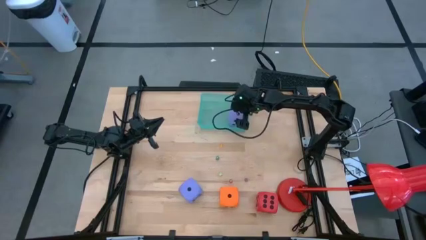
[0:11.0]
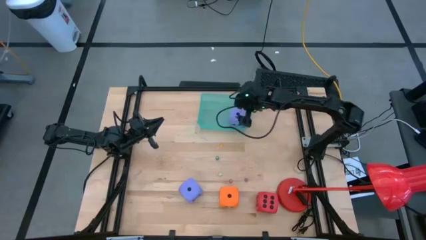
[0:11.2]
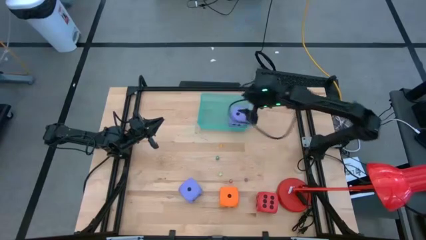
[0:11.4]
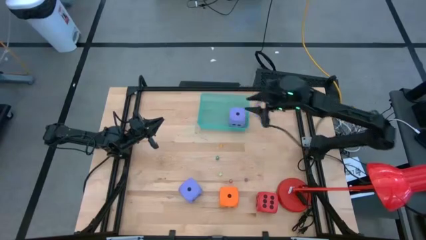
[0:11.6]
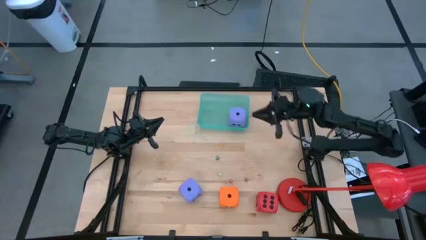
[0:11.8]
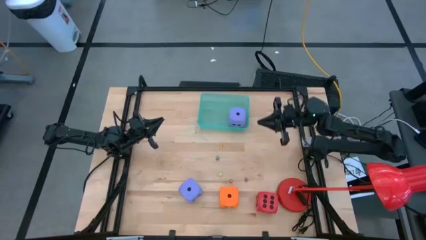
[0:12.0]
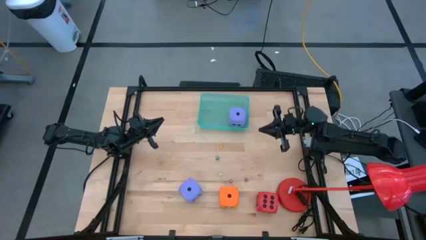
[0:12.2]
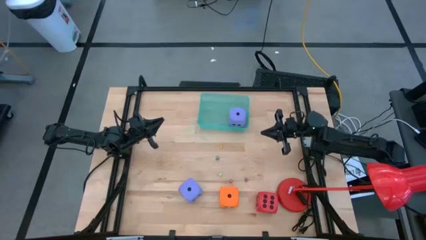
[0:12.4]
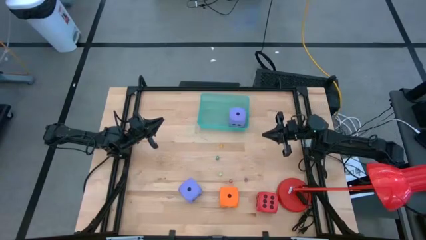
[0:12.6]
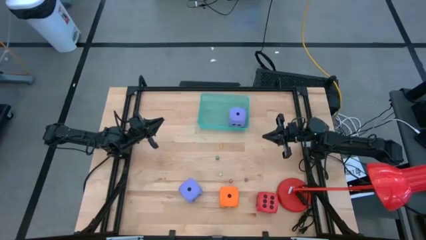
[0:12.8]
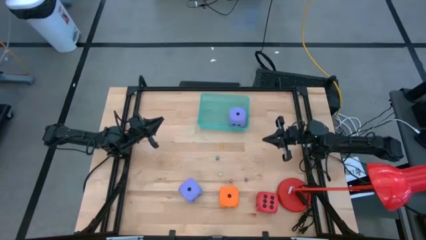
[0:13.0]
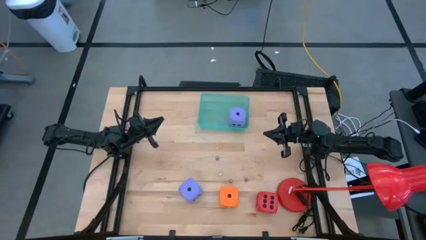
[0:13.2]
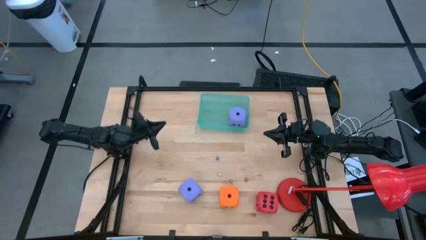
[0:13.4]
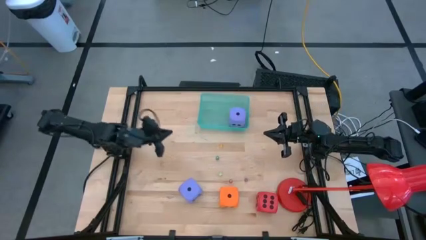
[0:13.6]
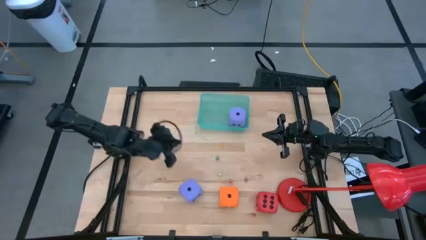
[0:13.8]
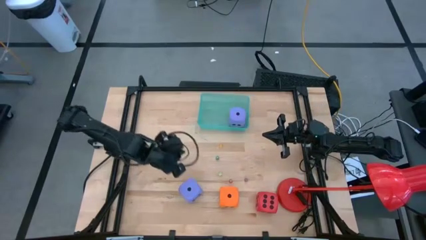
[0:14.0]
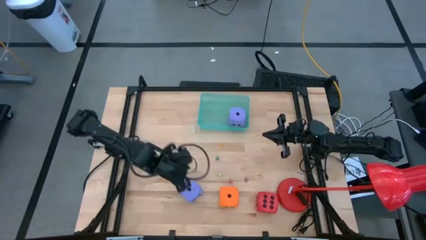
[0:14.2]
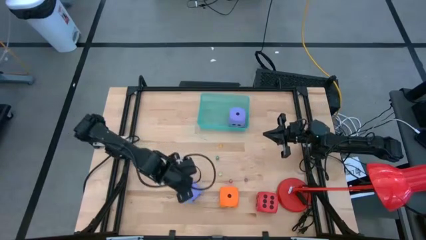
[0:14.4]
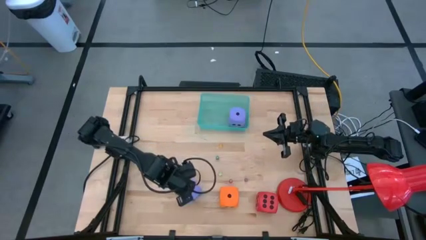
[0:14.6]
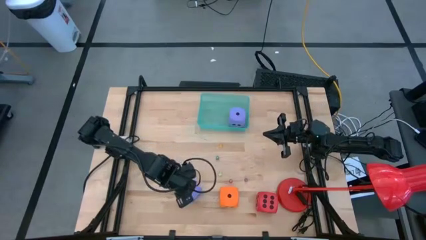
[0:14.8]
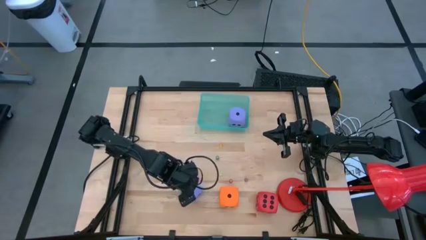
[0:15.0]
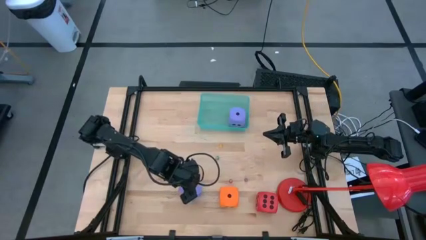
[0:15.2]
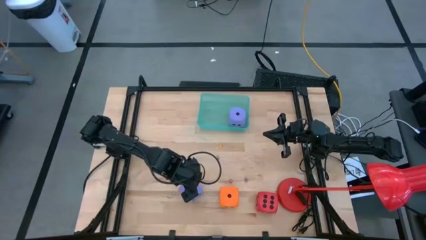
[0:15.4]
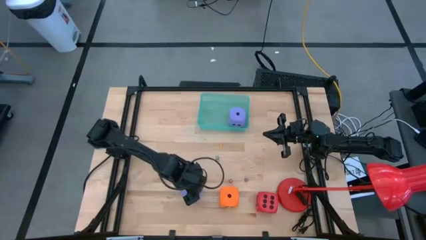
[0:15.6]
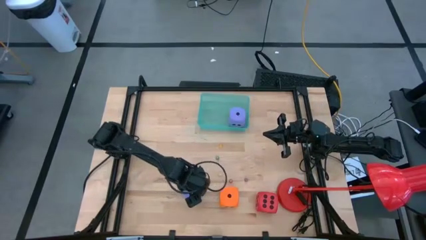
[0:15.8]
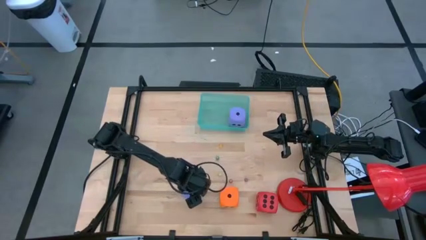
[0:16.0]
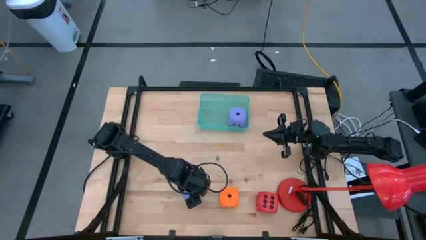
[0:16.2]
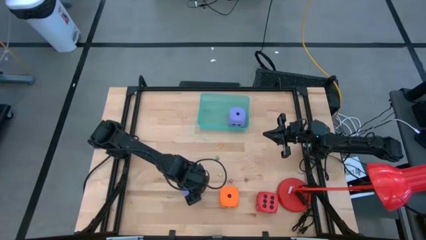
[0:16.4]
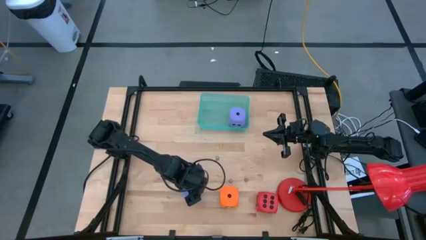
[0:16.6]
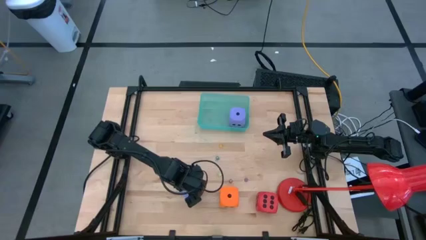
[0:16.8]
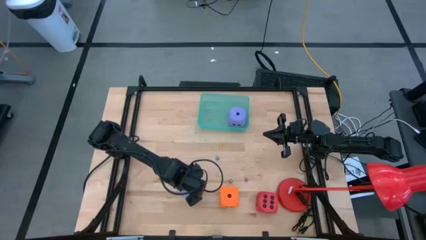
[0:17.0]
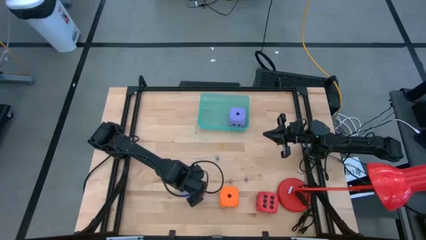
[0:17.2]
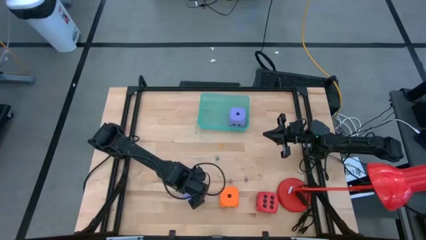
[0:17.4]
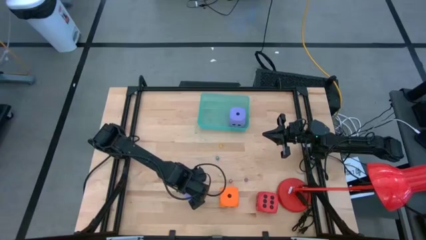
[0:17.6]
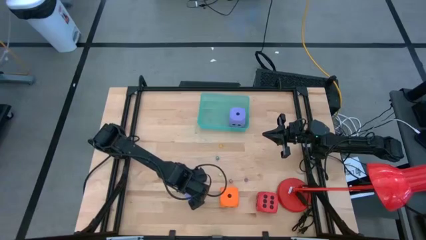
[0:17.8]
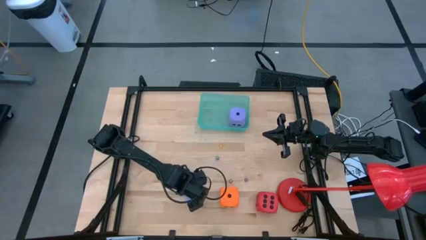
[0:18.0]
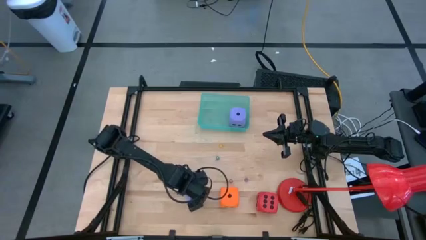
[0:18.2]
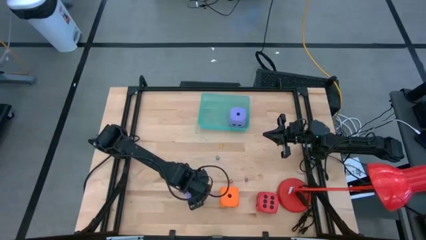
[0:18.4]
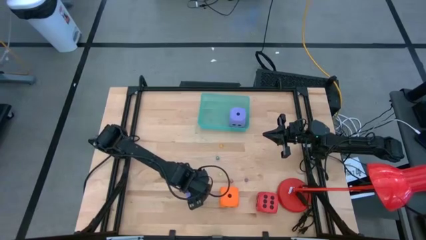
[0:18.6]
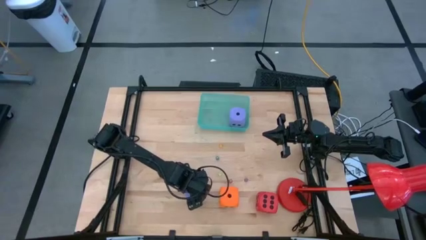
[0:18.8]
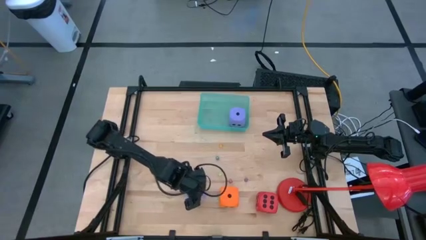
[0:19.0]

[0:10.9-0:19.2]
Task: Pick & Place Dice
Put the large purple dice into the blue transparent bin

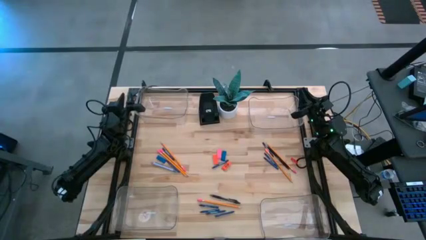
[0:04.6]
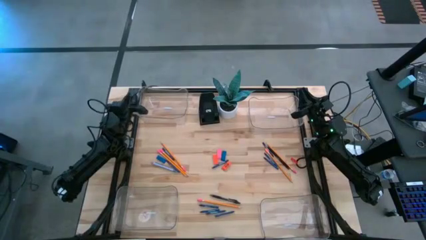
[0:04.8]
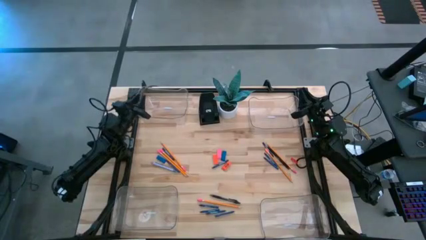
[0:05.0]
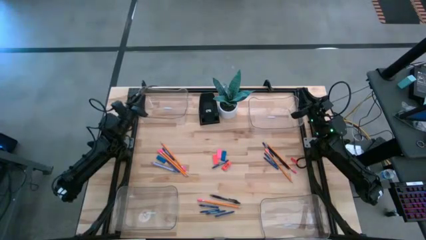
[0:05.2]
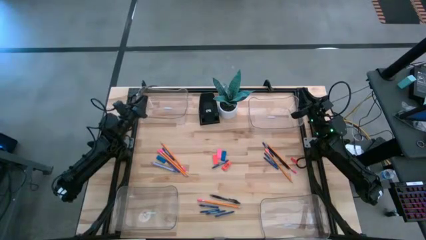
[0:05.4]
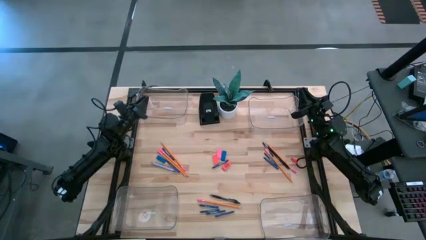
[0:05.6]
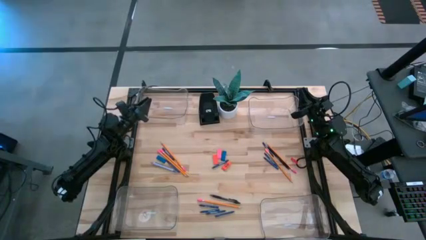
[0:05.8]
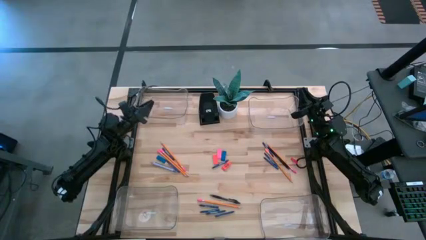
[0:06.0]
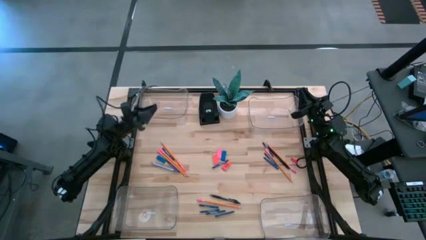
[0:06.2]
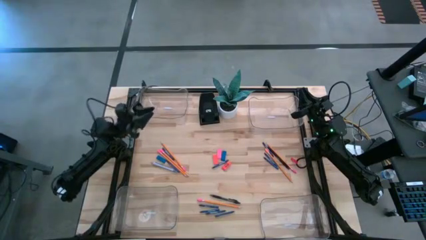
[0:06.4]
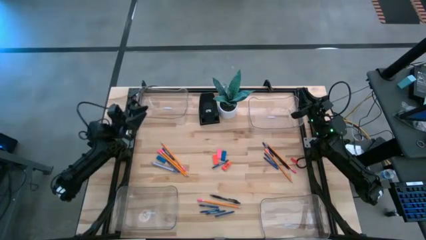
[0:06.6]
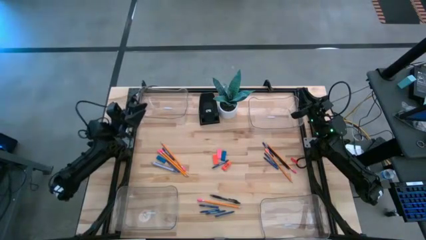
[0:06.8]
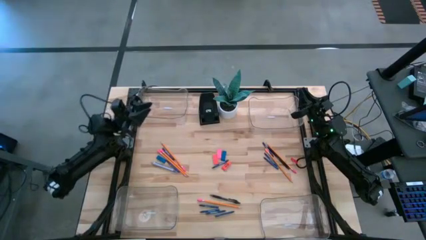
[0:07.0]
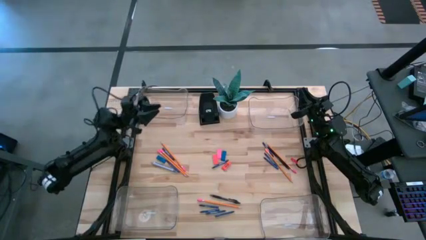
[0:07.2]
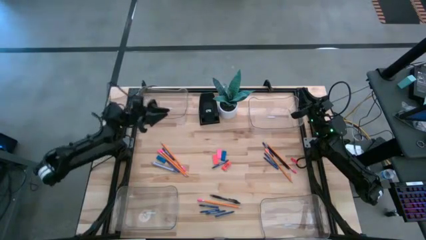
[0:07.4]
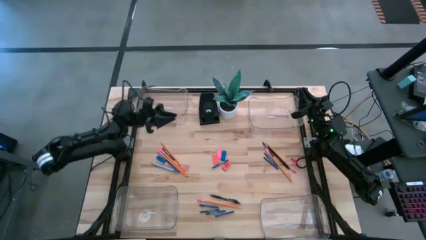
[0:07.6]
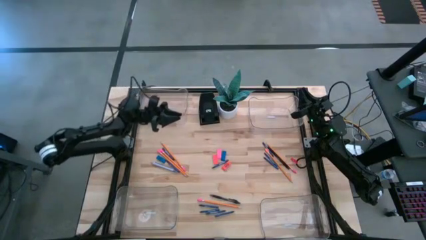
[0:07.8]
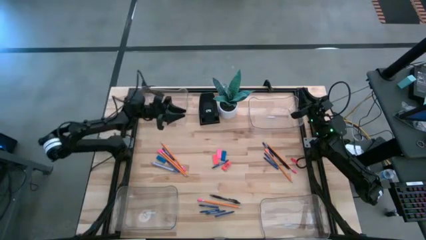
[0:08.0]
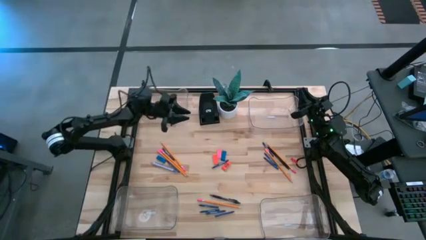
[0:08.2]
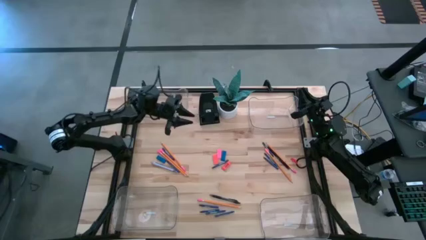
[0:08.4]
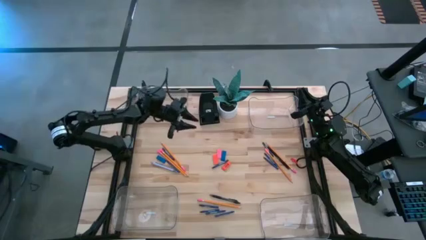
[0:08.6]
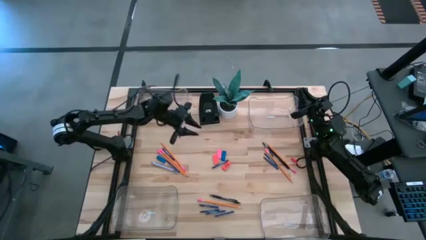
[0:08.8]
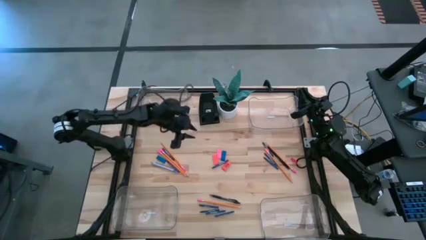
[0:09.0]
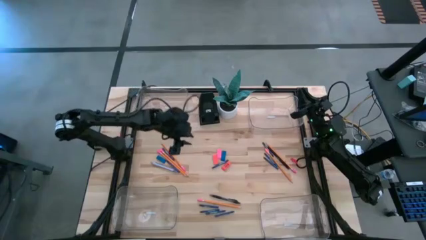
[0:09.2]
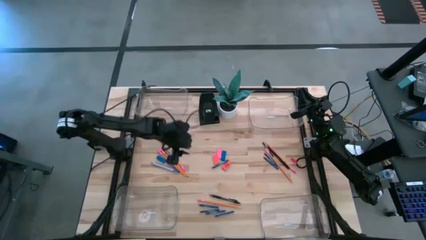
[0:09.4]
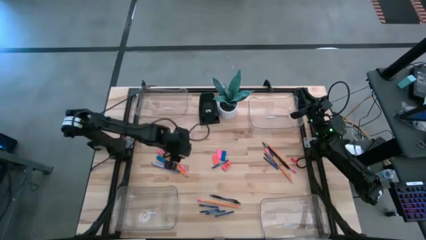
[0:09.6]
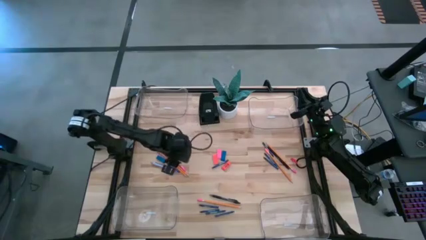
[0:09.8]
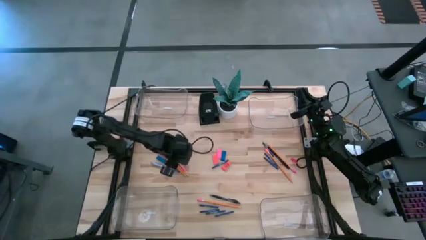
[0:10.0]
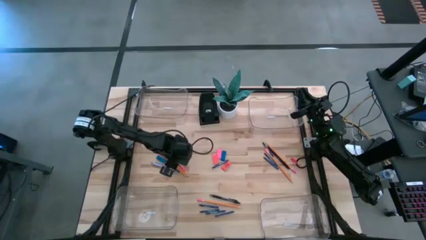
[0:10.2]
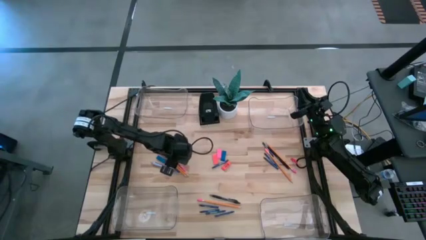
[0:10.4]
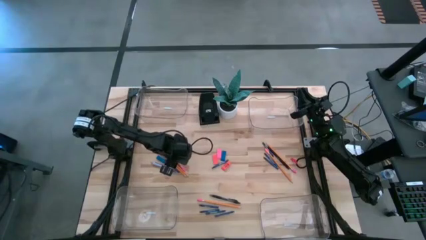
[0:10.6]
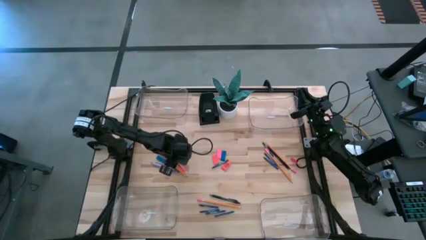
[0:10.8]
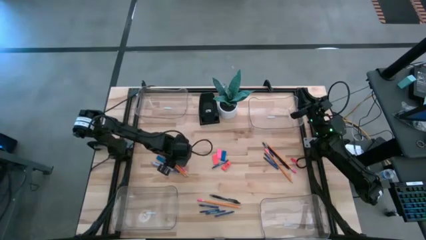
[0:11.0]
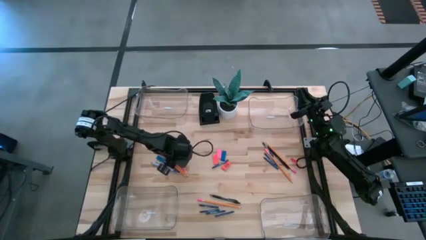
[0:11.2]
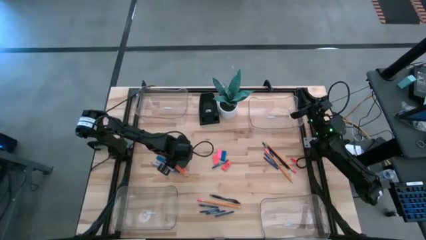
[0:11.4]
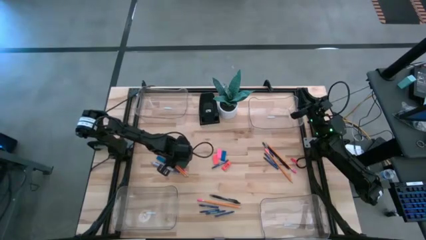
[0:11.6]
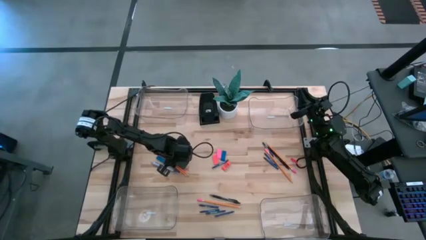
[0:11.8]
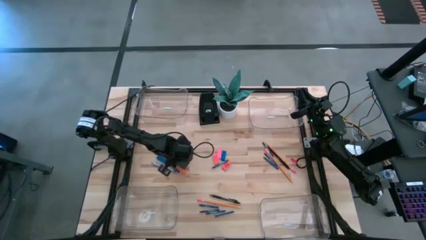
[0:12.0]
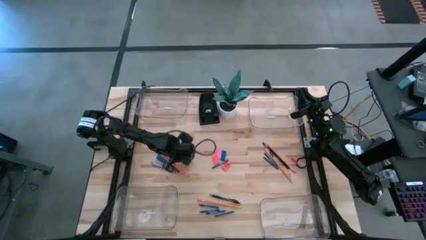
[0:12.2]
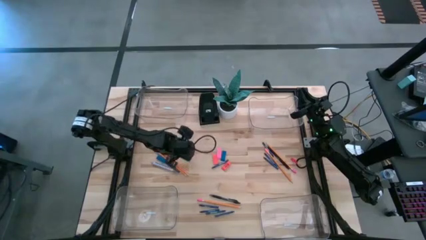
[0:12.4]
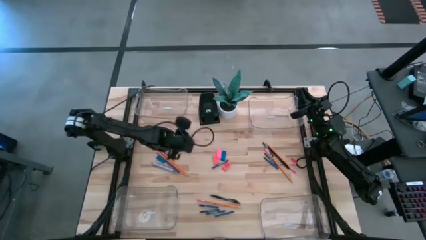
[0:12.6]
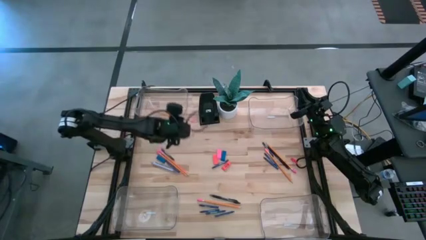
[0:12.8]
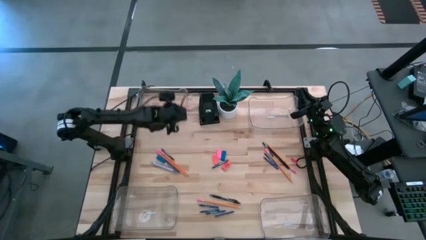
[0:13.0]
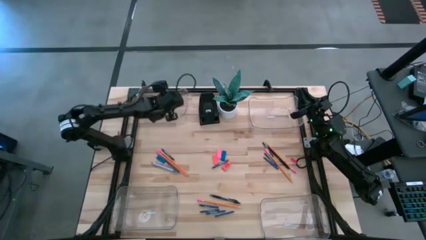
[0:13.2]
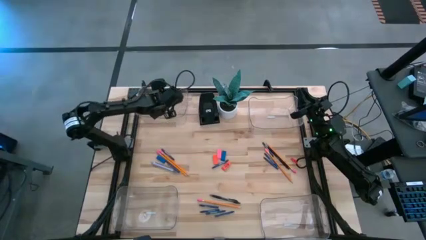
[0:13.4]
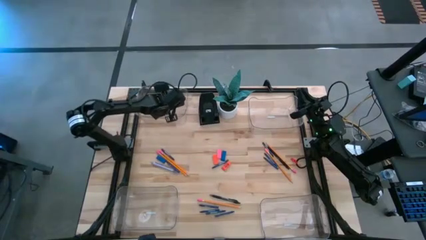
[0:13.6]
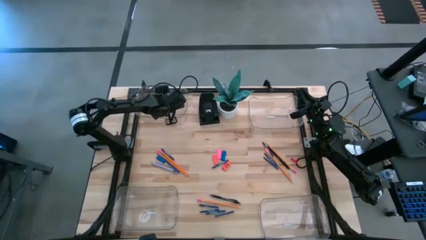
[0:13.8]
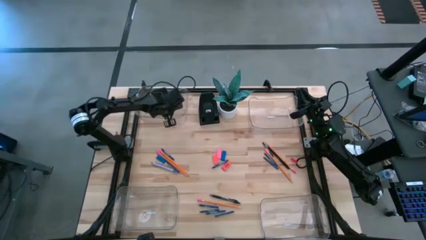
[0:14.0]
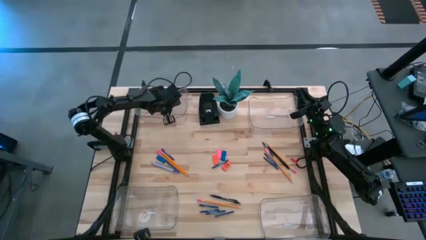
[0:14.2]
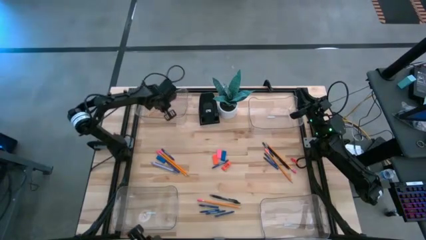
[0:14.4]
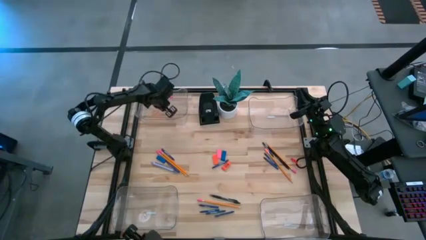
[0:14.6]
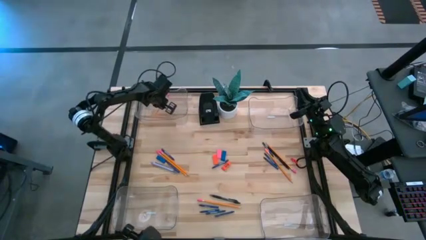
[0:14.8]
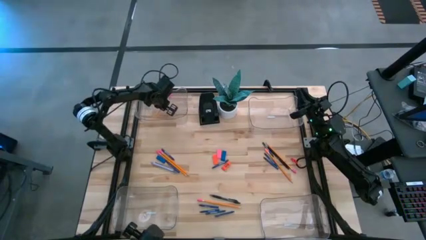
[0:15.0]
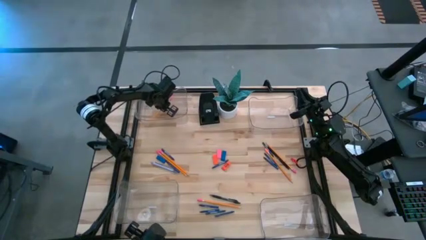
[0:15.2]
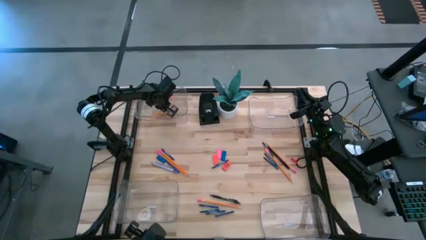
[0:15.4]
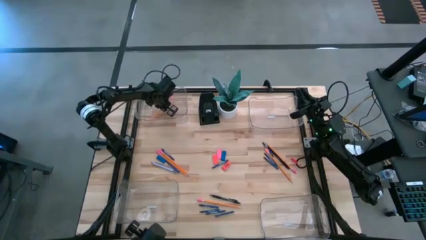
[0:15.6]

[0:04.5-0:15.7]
Task: Sort crayons/erasers/pens/pencils in bins
Put the orange pencil into the top left transparent bin
